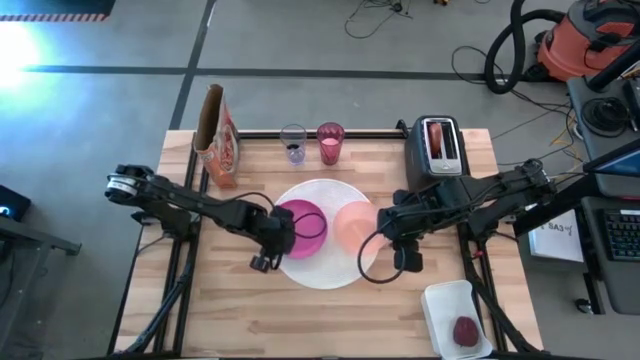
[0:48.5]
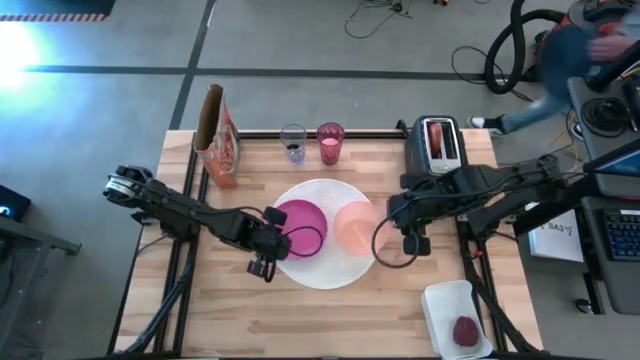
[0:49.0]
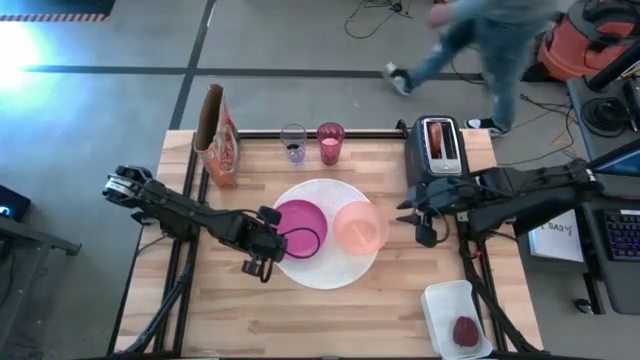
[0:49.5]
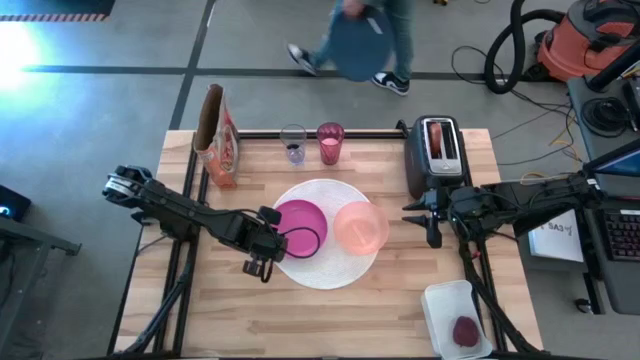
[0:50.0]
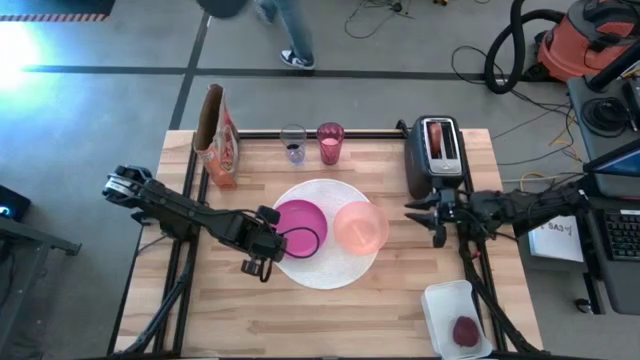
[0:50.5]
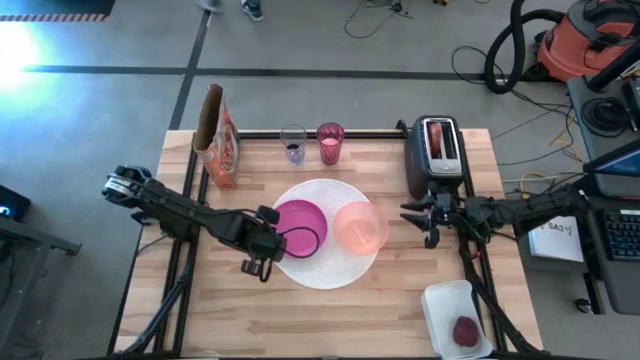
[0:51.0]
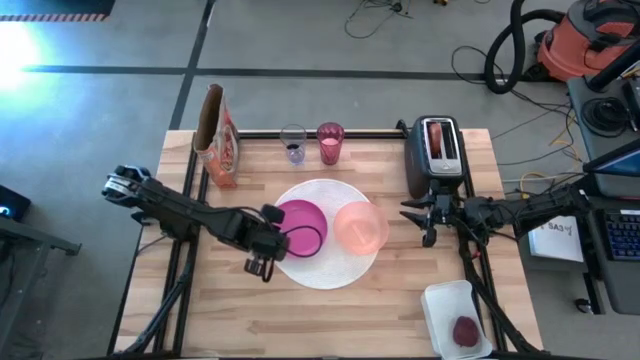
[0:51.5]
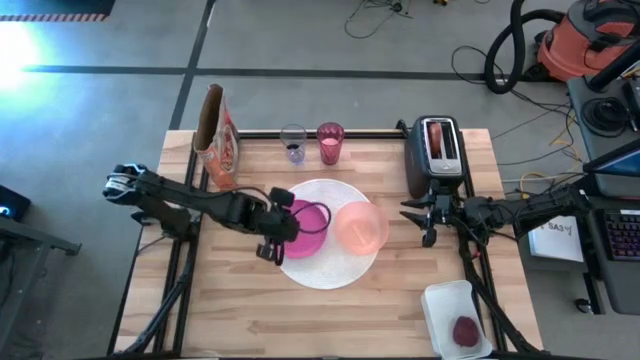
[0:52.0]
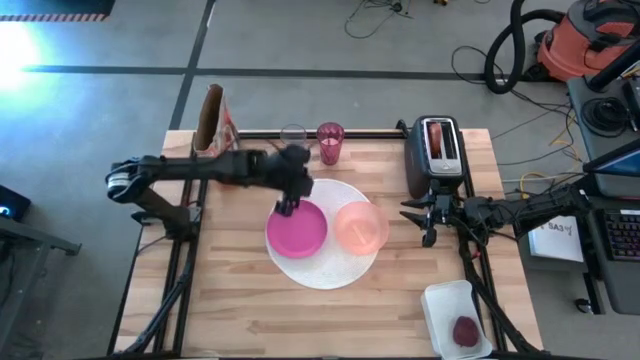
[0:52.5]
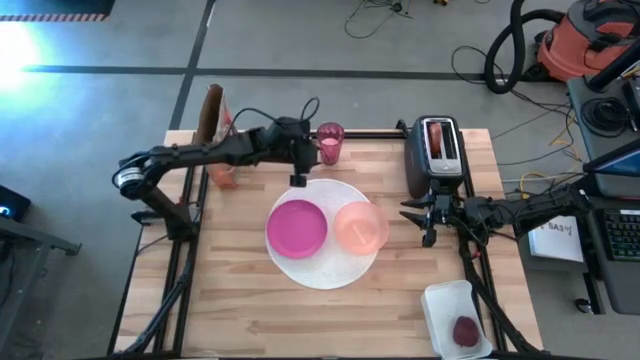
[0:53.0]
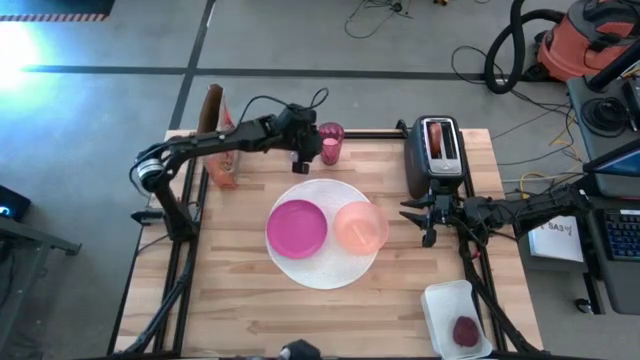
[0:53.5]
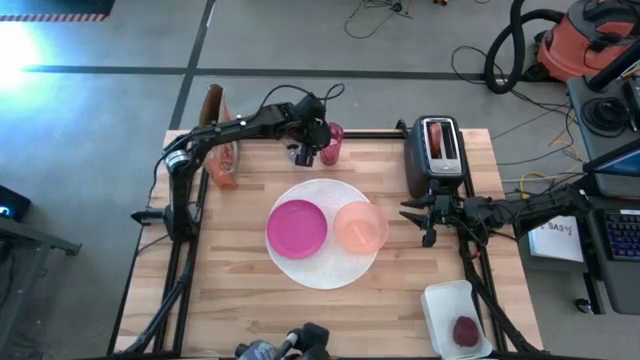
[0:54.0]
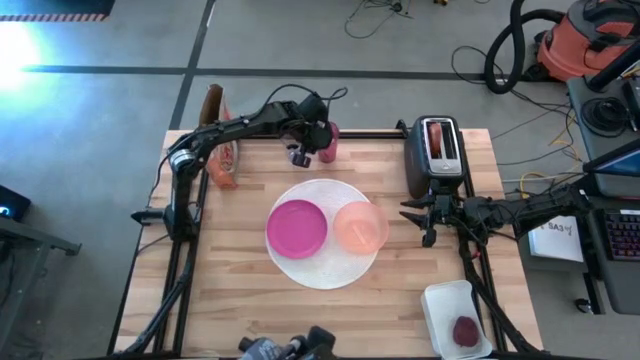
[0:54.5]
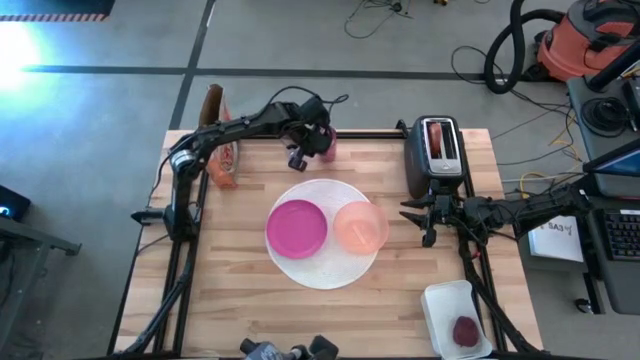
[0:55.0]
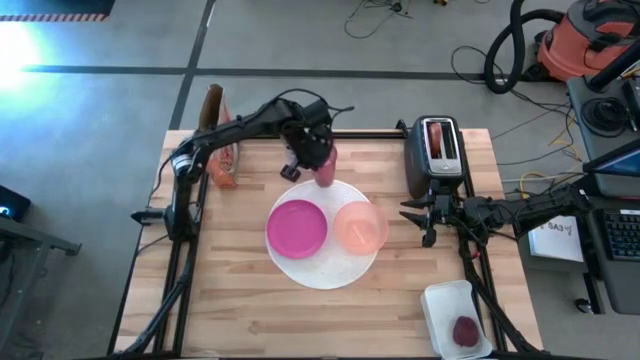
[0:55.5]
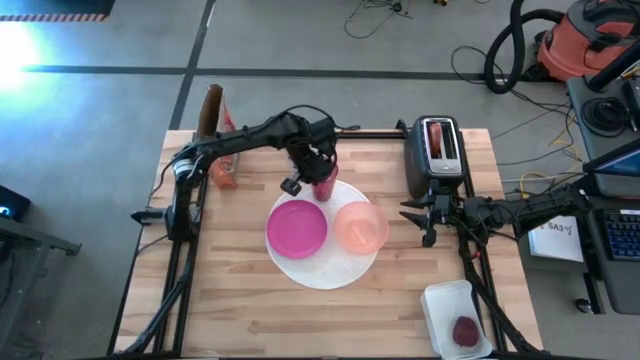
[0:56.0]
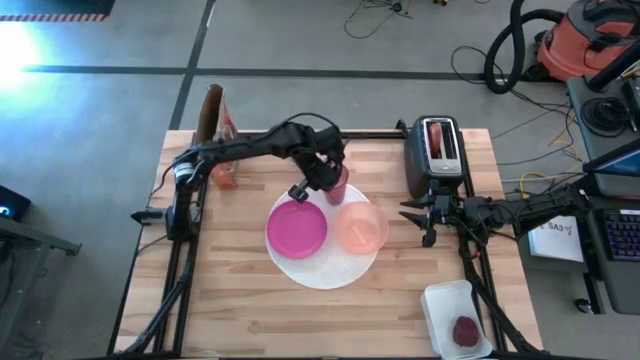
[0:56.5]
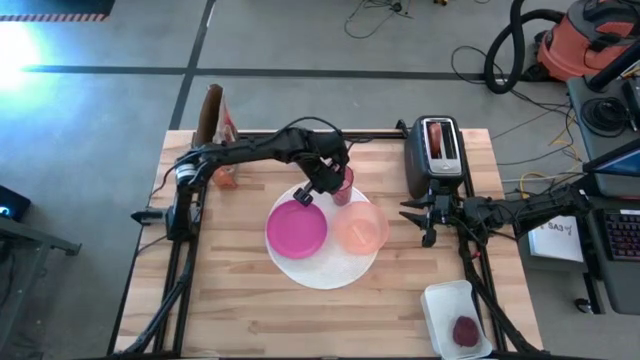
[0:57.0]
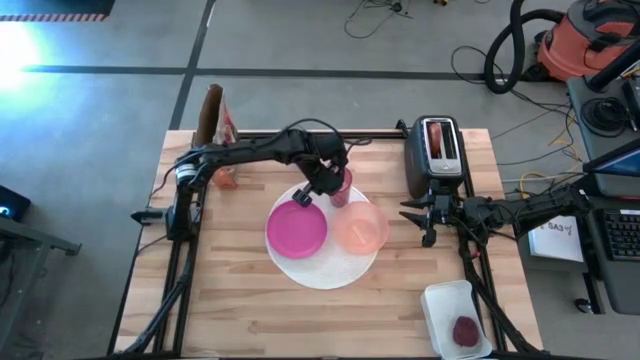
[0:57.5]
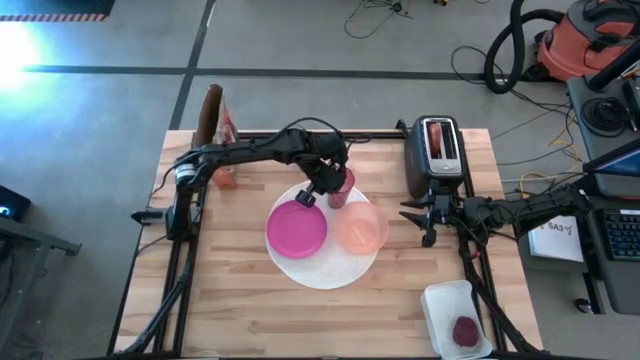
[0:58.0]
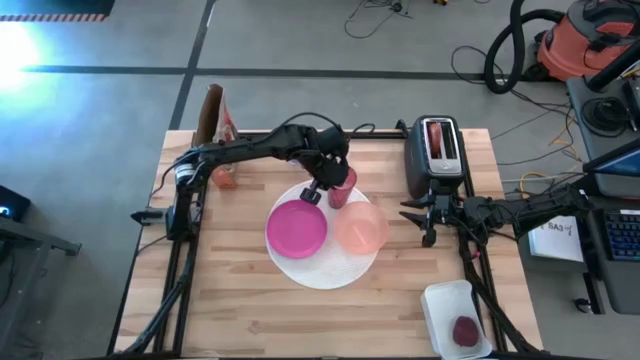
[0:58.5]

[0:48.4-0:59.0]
Task: Arrange a breakfast setting
Put the cup of rice grain on the table mat to the top left of the orange bowl

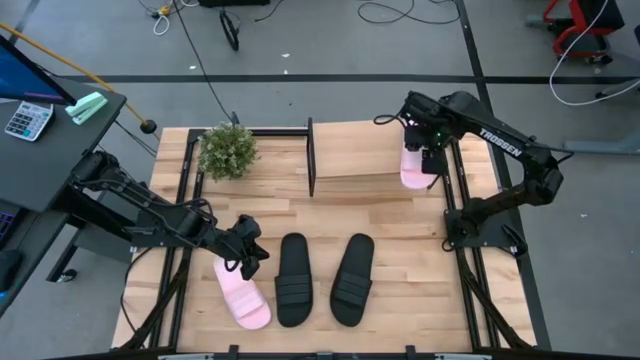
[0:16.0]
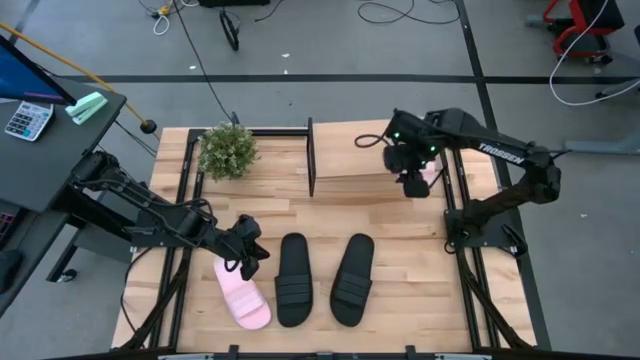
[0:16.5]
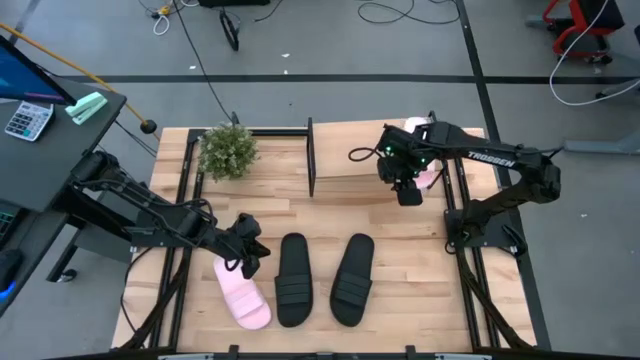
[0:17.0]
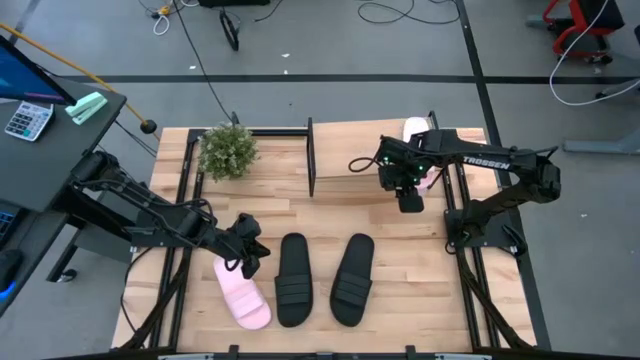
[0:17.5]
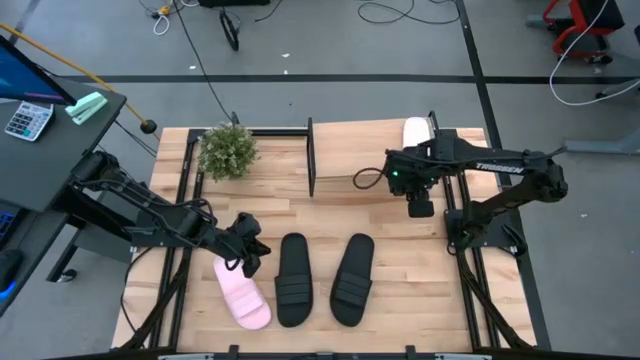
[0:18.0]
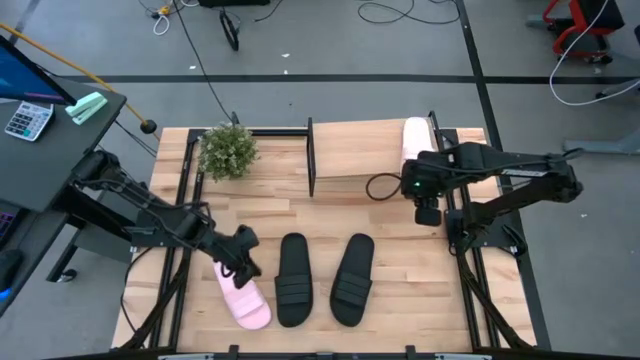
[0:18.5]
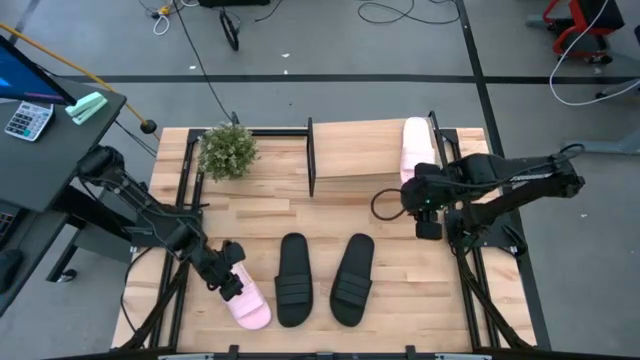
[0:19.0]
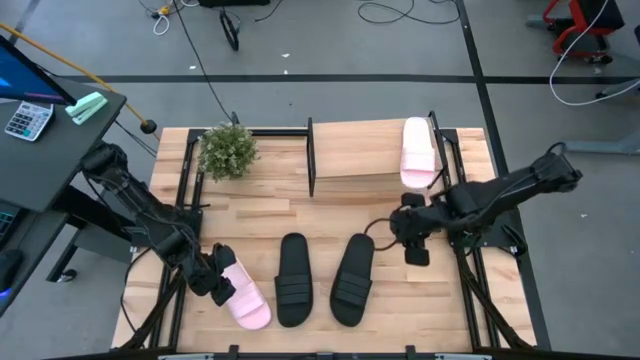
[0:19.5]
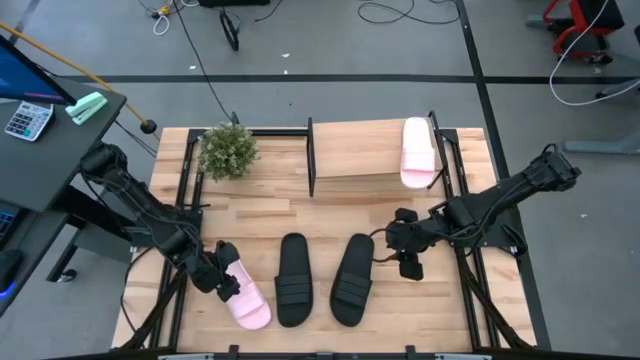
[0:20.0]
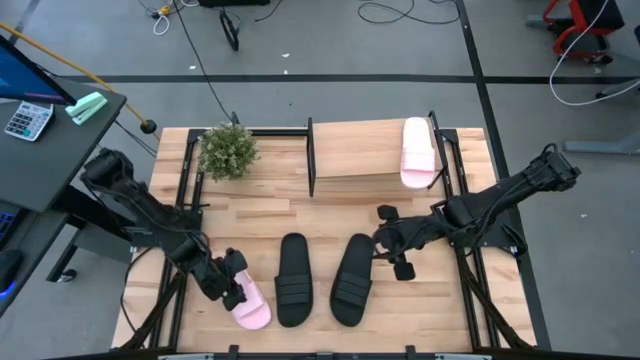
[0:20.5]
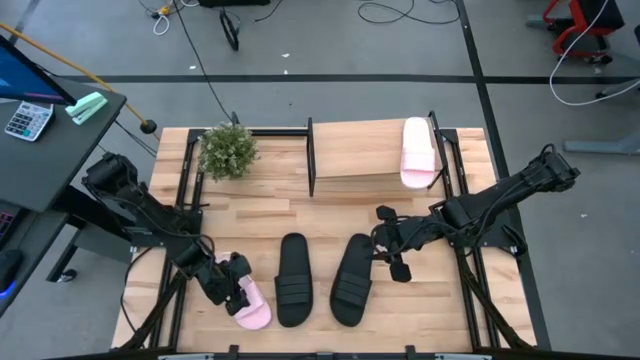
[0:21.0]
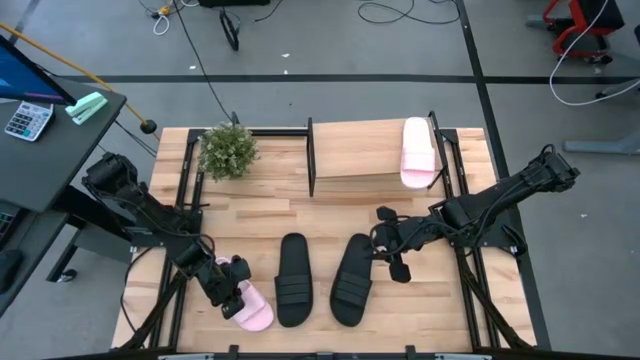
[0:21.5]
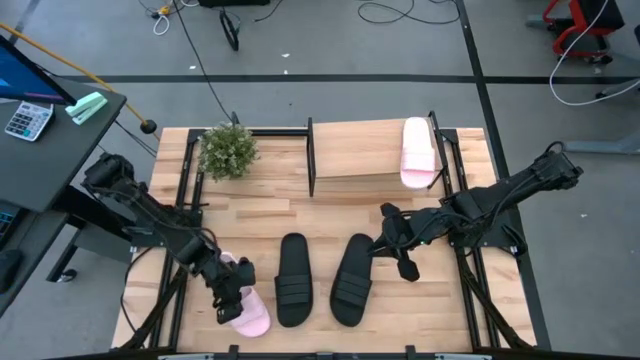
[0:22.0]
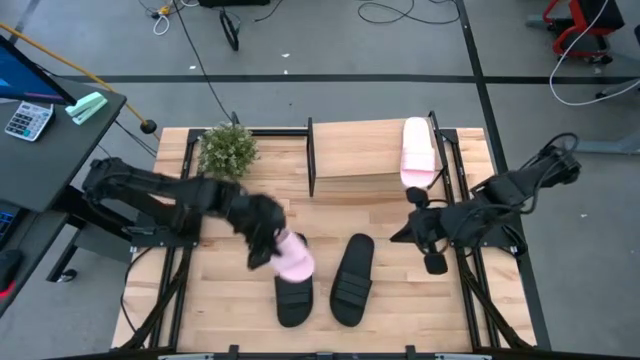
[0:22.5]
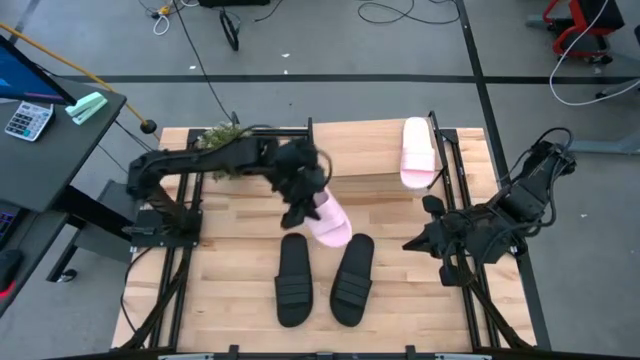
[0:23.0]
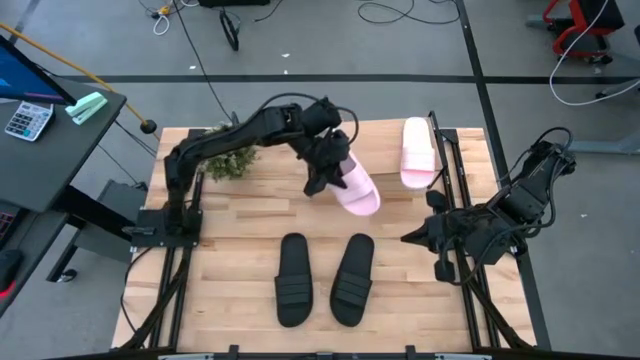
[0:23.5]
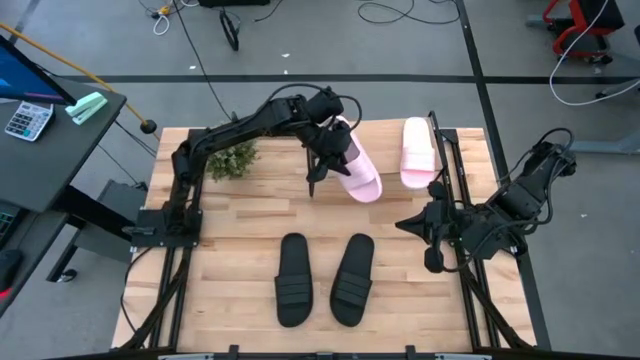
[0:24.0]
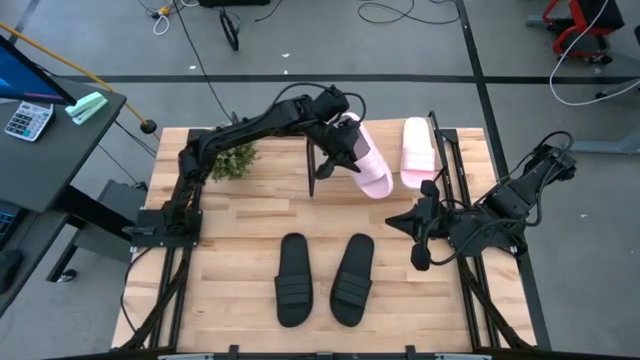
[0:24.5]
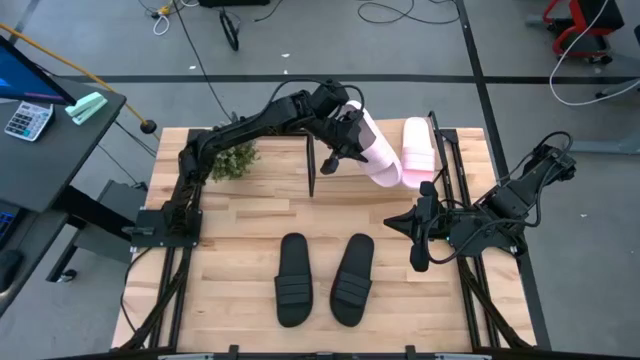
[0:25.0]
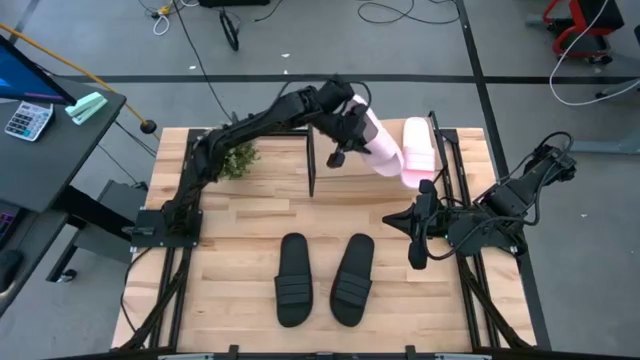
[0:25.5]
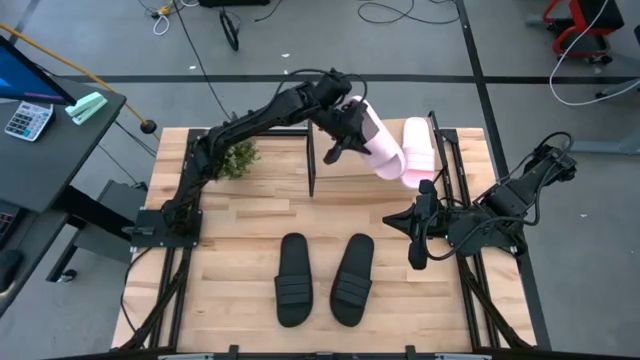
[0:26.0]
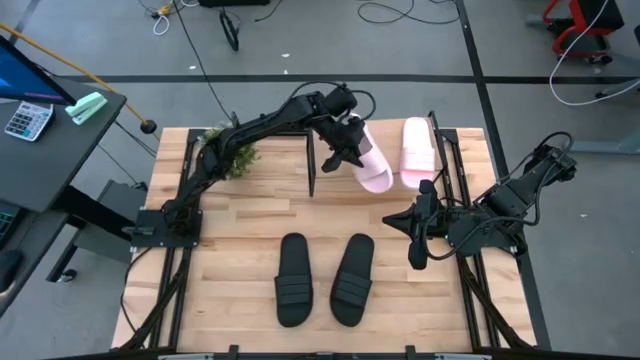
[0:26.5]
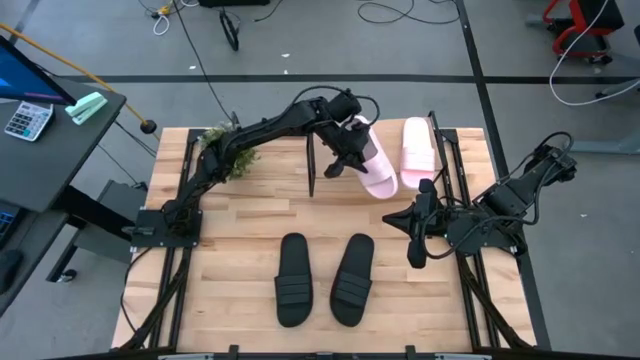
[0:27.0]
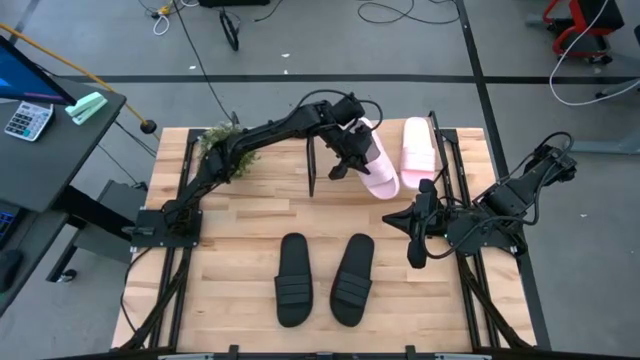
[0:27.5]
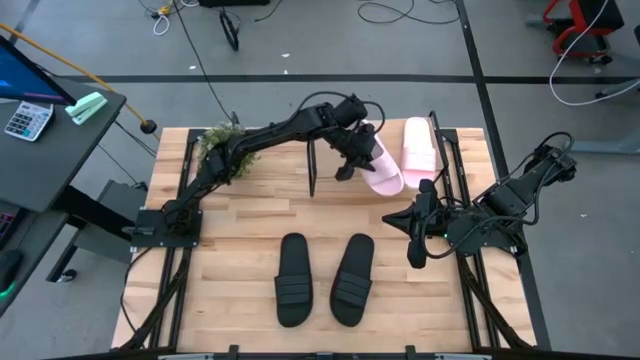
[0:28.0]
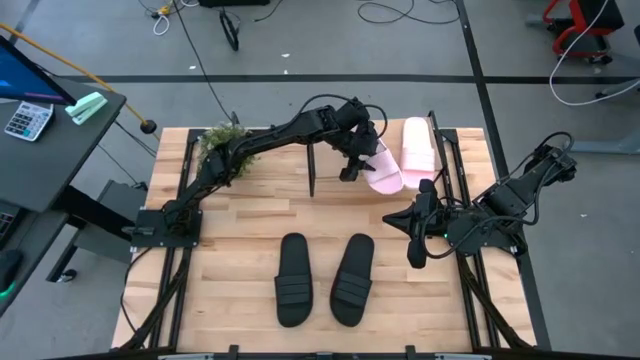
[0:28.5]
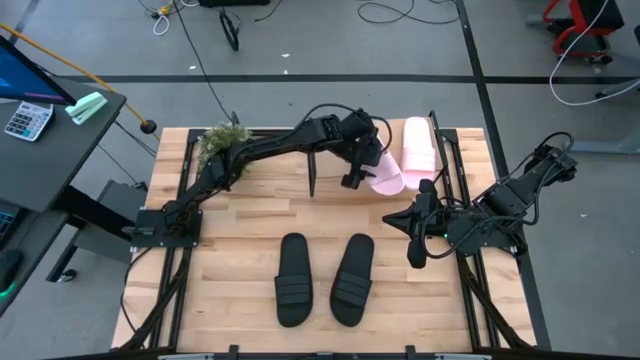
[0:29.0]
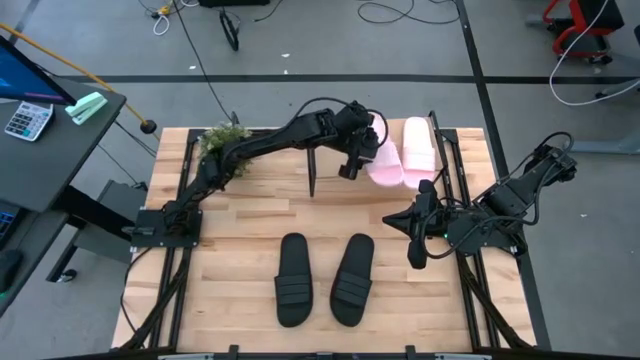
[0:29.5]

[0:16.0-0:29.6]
Task: Pick and place slides into the shelf
Put the pink slipper on the shelf
